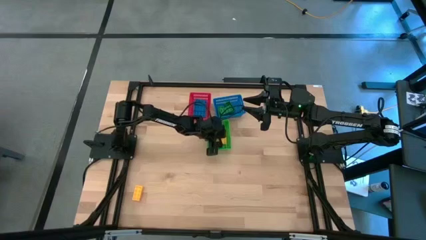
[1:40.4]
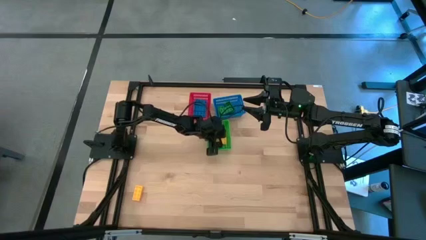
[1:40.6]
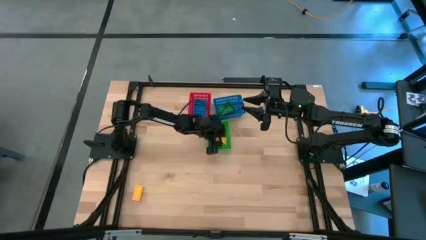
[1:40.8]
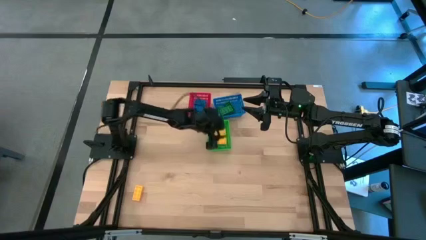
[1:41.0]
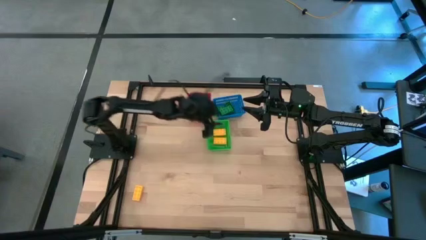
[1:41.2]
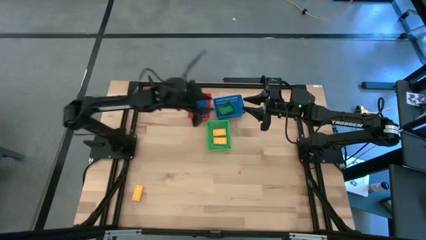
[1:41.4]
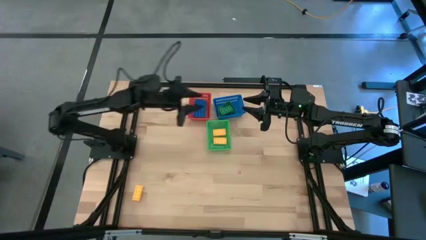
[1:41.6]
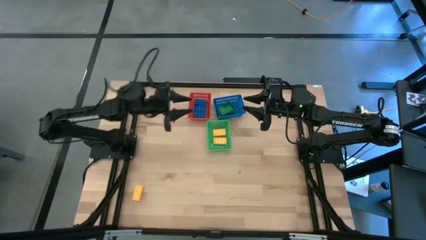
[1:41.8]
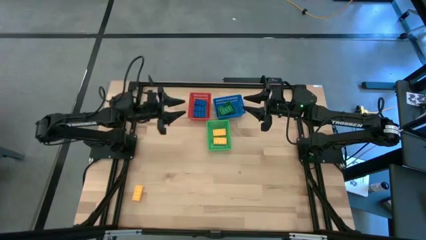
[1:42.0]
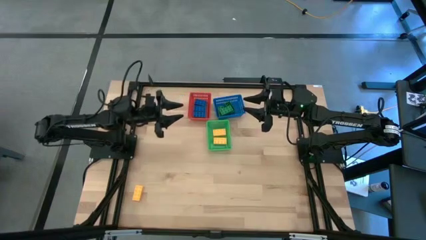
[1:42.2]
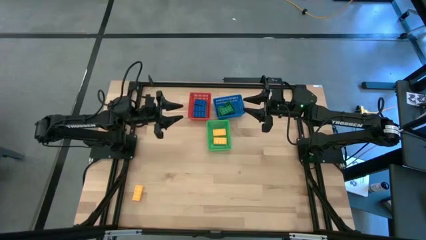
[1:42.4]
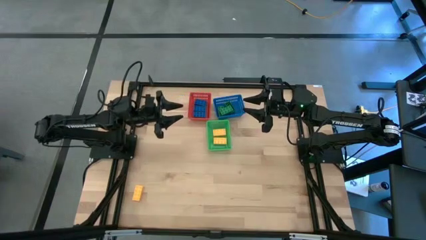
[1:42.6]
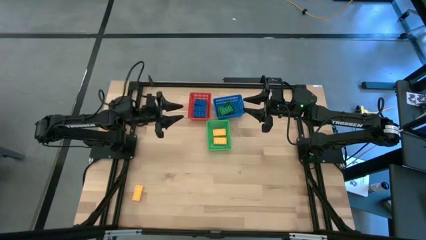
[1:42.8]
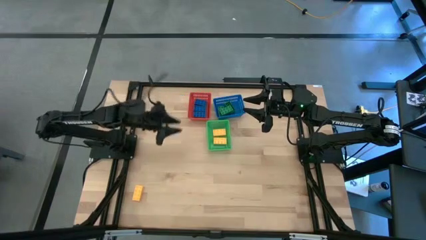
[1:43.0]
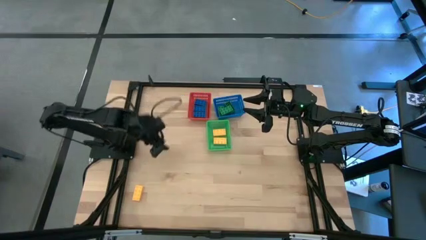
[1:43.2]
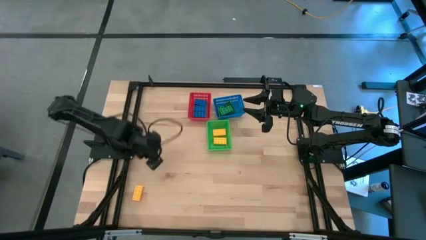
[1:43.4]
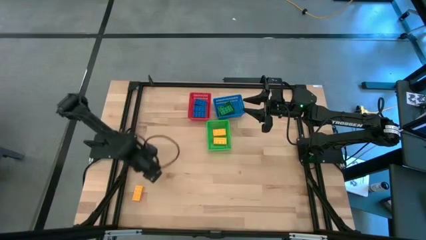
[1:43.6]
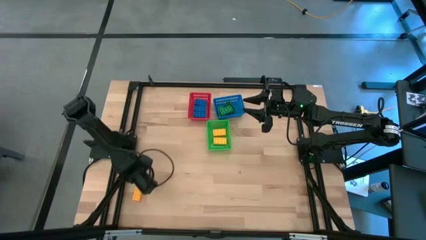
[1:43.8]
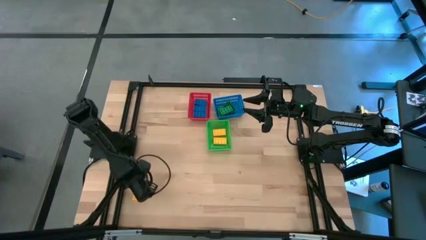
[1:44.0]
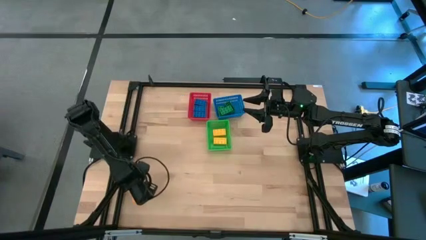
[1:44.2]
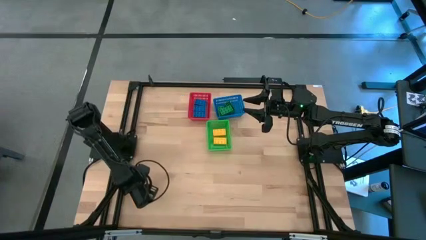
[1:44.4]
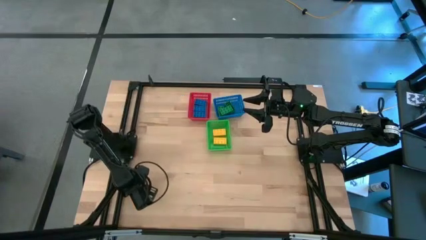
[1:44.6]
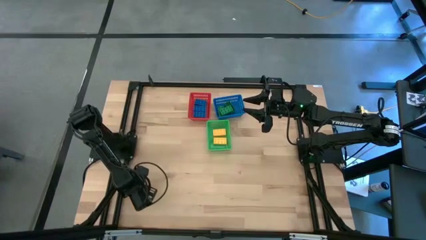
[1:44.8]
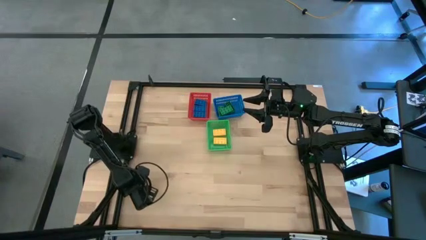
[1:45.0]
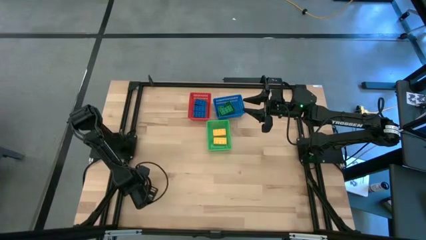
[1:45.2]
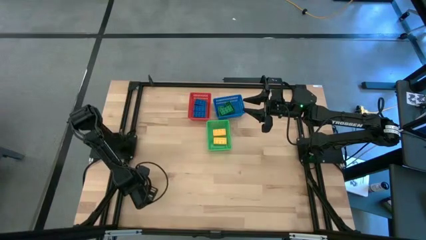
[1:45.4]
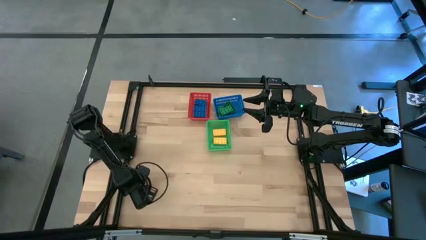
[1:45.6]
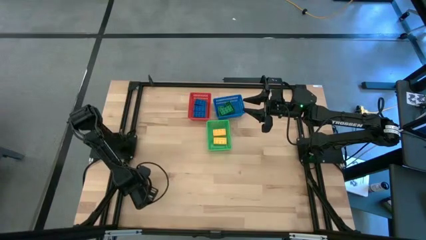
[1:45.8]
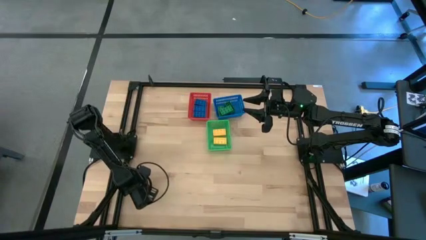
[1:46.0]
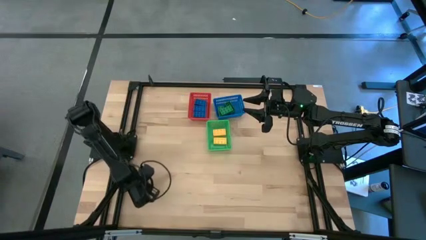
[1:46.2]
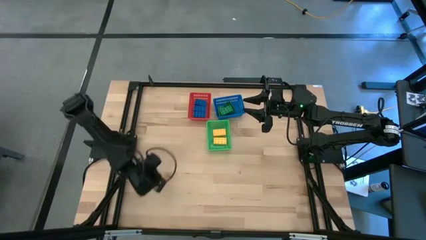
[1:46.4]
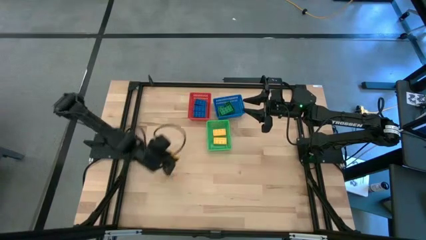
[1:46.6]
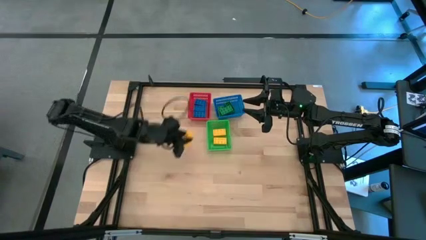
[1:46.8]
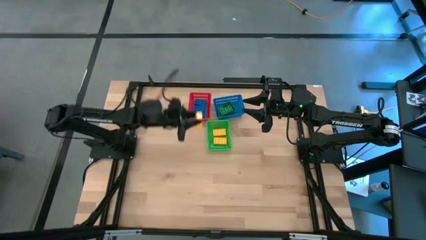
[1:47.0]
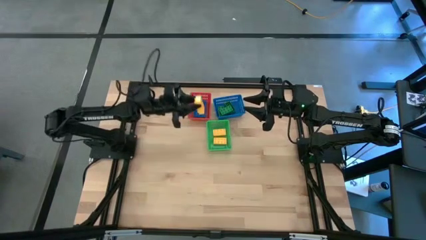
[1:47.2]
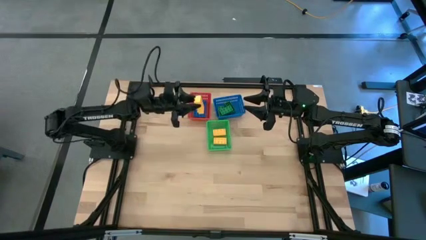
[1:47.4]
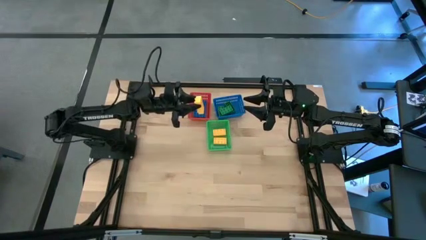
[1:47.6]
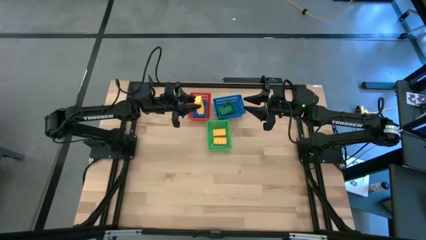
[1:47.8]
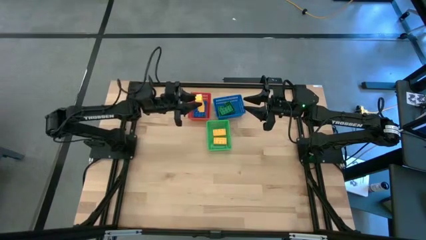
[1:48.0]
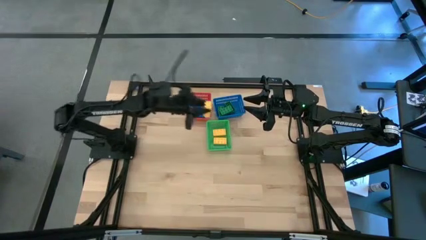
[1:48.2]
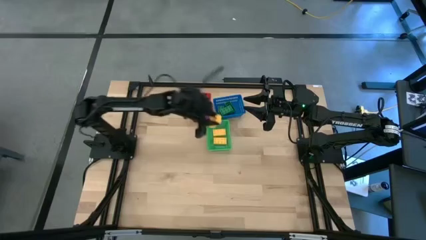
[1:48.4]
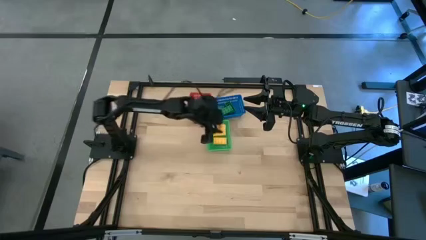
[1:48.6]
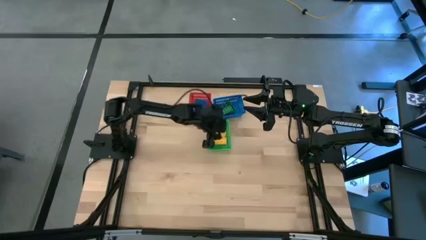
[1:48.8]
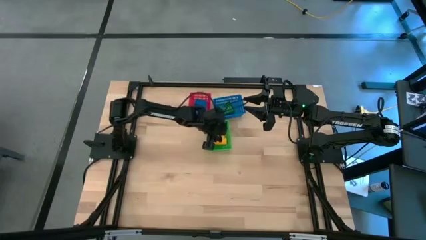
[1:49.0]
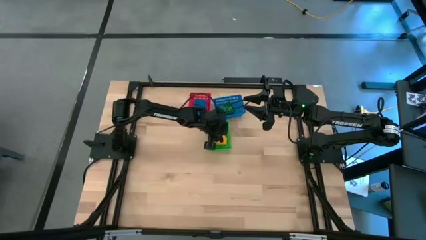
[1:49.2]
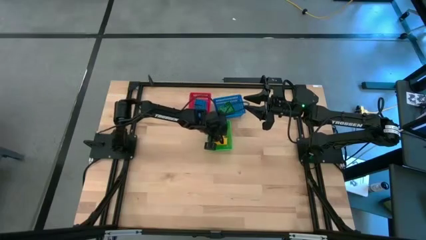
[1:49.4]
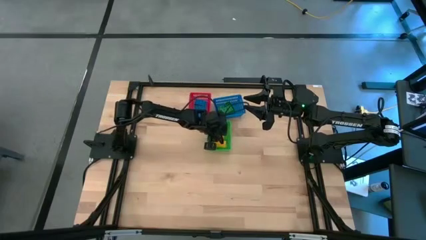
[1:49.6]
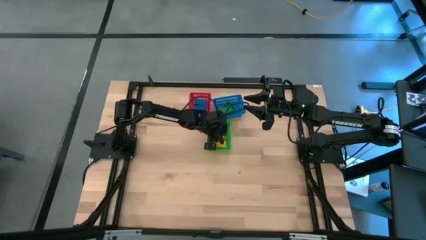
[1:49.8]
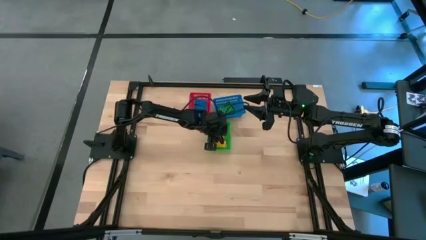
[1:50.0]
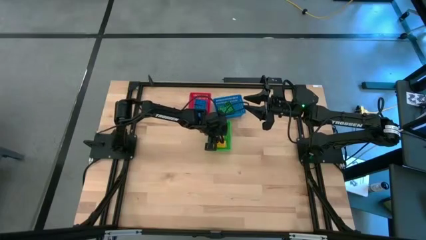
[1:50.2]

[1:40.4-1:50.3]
Task: Sort & place blocks by color
Put the yellow game piece into the green bin

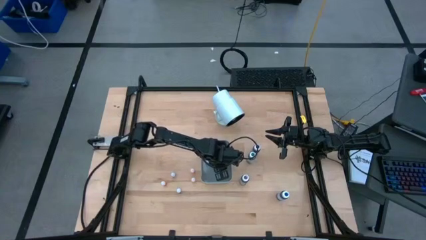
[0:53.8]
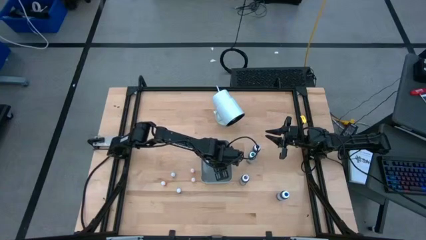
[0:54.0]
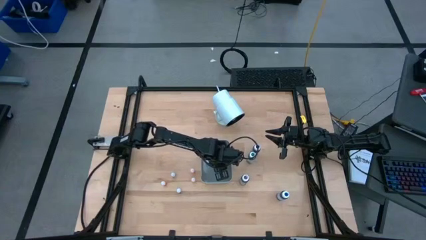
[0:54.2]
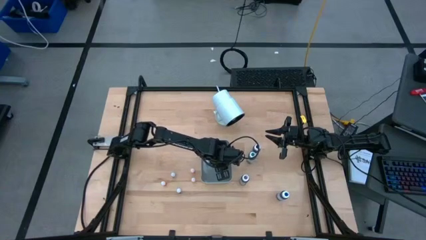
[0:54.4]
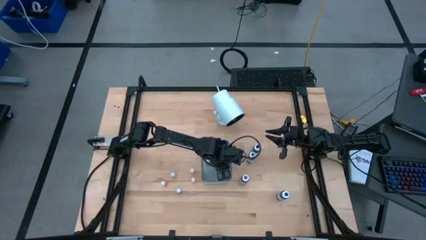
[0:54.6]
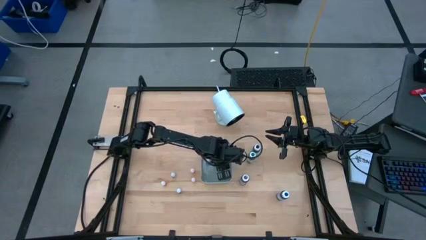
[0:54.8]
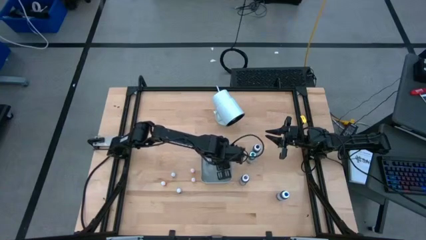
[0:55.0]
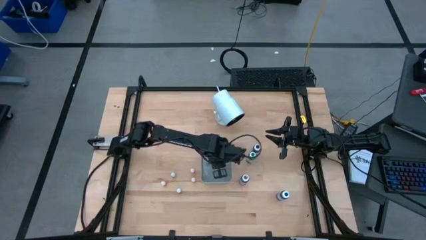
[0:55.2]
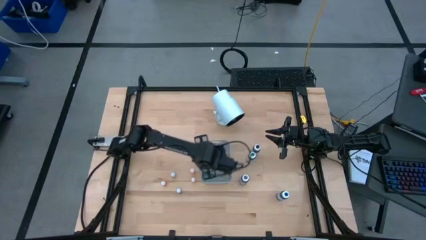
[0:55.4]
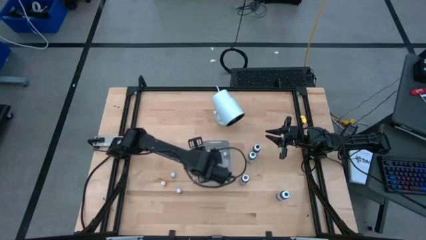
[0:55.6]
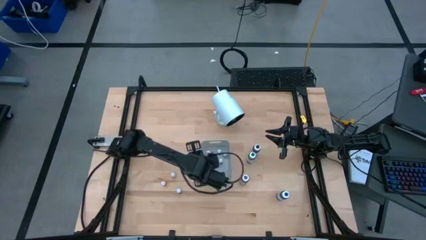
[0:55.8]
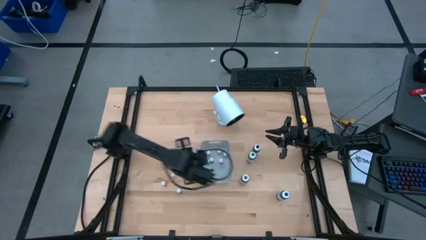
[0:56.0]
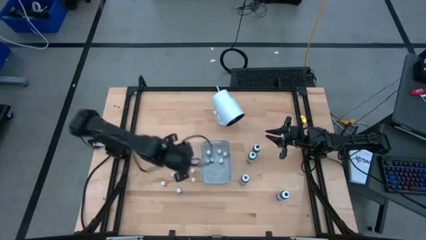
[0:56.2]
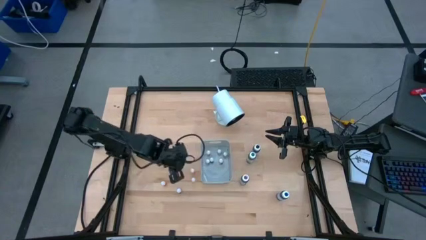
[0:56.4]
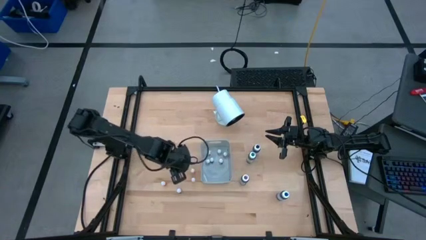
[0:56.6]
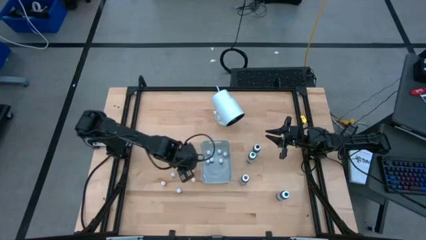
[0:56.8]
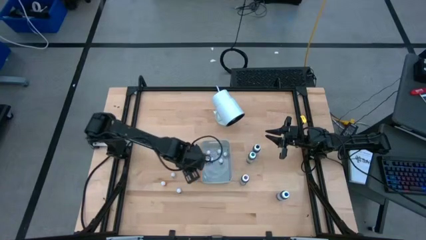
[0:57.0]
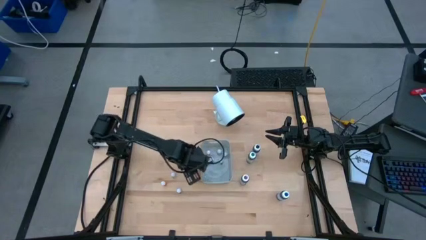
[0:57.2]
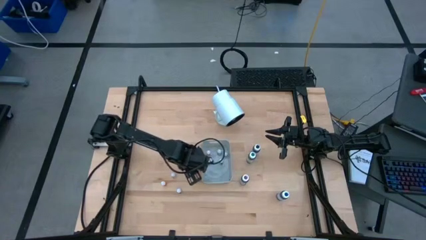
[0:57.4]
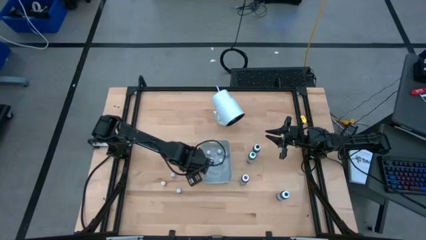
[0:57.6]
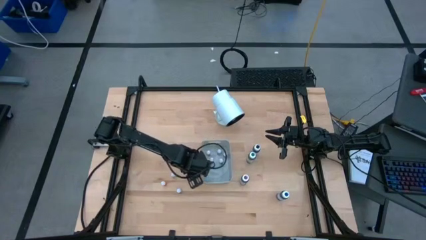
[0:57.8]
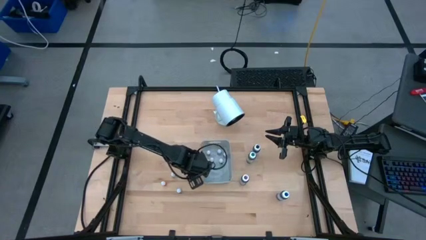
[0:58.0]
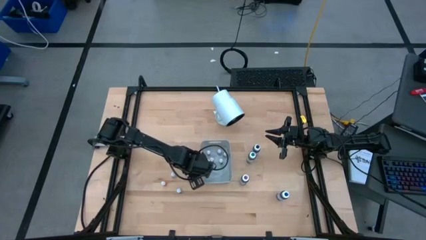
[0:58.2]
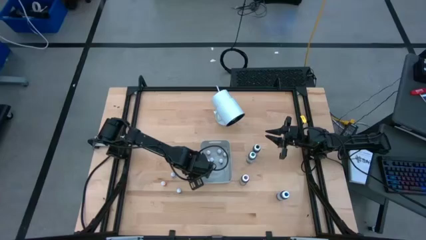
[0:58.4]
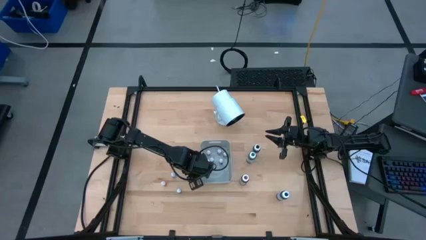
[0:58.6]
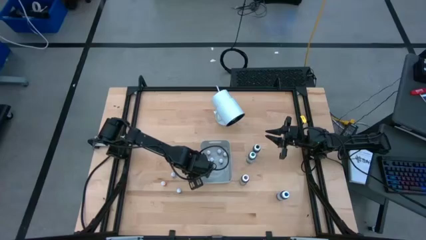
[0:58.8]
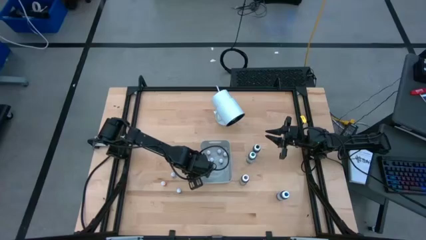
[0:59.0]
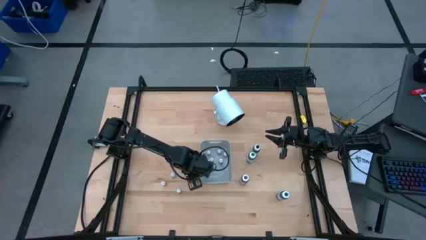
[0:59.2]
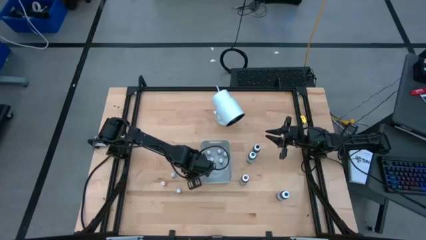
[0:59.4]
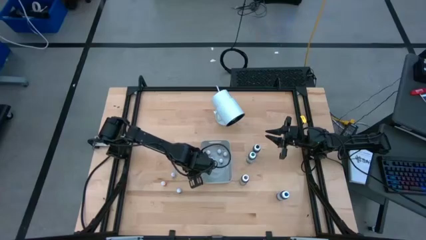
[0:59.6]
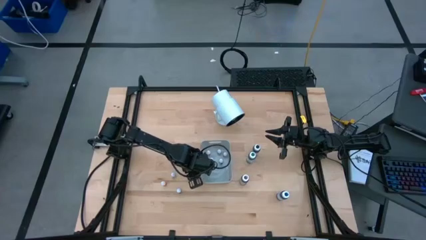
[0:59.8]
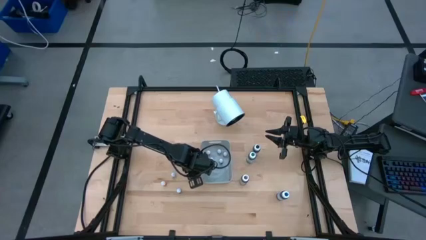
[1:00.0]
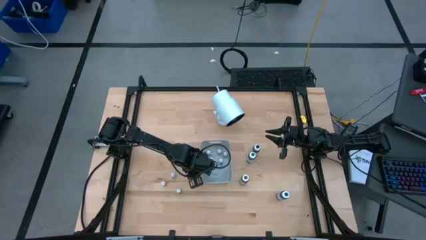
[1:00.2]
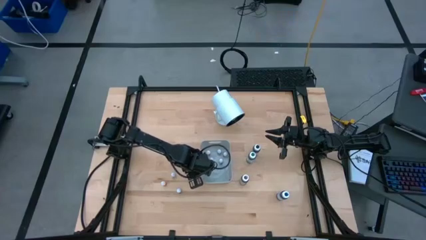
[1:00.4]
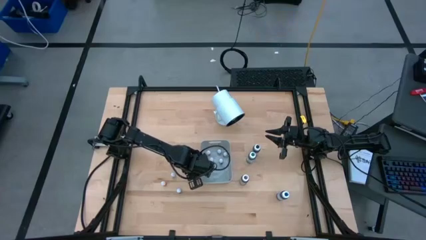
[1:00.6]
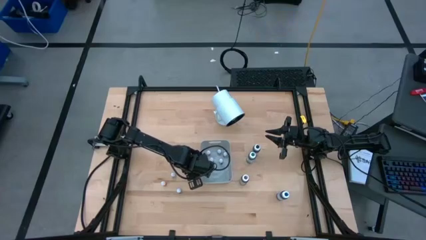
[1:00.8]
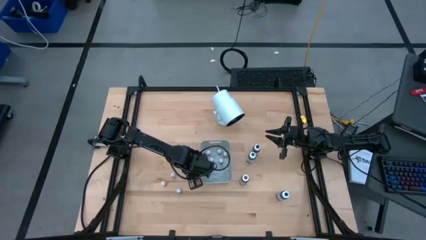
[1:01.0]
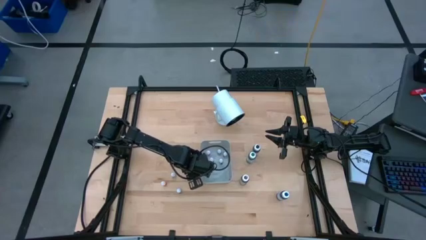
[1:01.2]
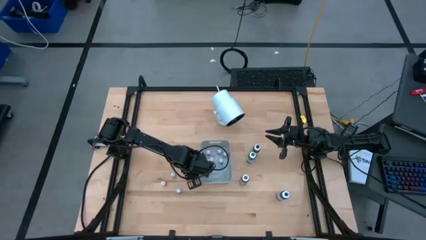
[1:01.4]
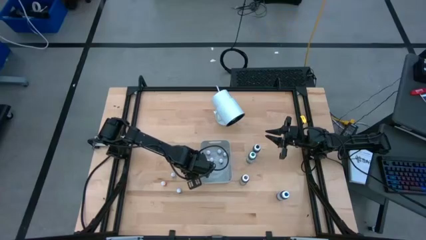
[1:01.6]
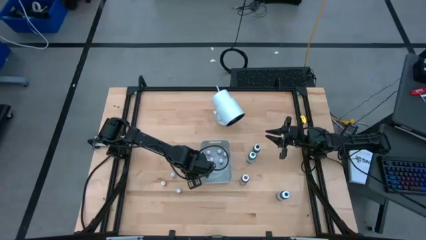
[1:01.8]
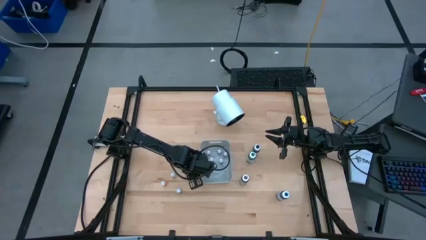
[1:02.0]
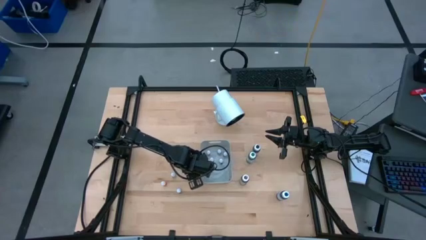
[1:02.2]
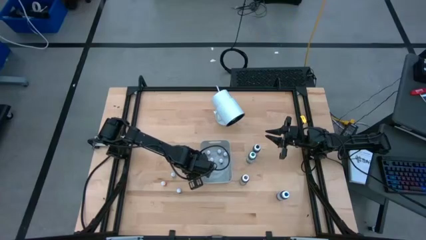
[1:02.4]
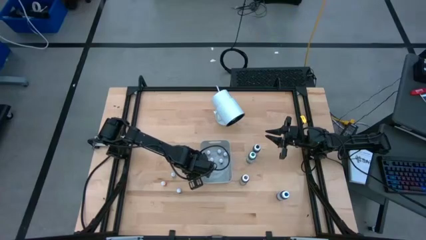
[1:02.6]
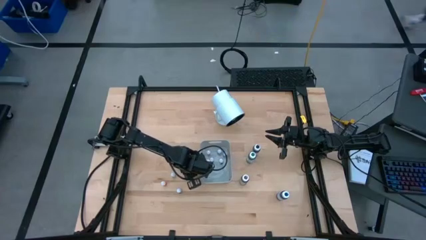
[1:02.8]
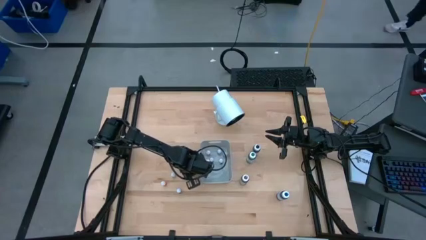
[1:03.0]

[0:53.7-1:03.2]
Task: Pick & Place food coloring
Put the top small orange food coloring bottle into the gray bin
